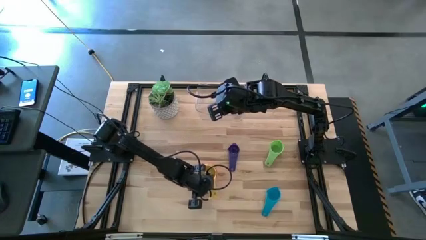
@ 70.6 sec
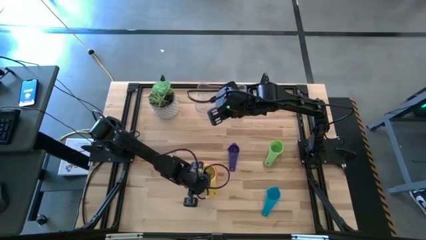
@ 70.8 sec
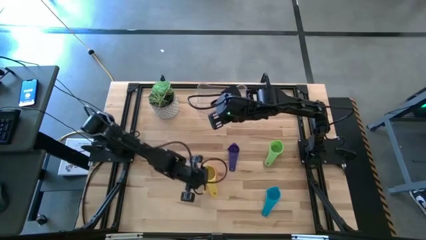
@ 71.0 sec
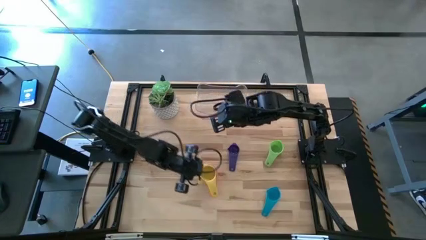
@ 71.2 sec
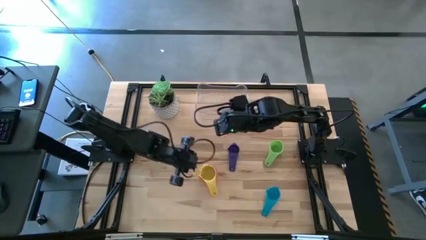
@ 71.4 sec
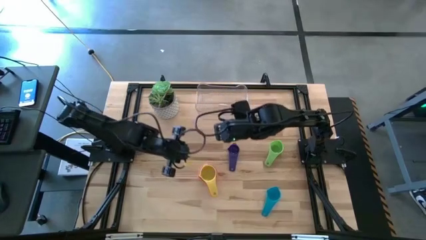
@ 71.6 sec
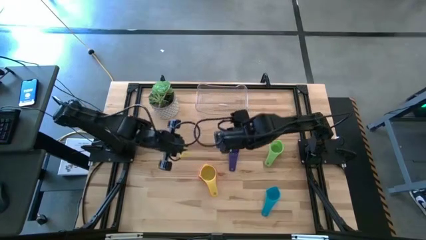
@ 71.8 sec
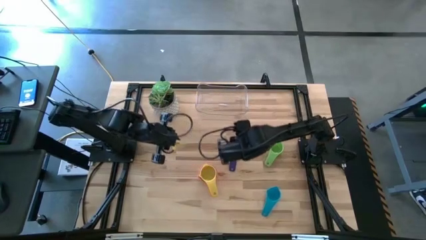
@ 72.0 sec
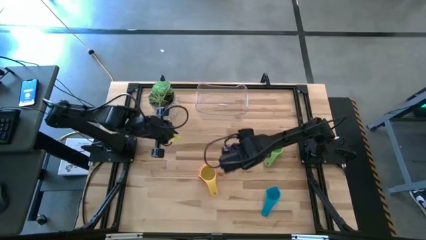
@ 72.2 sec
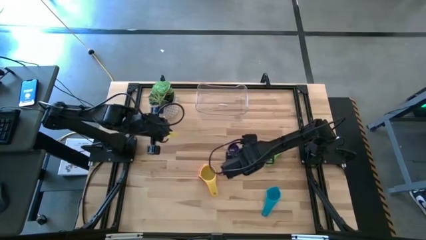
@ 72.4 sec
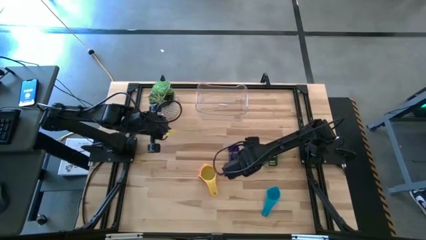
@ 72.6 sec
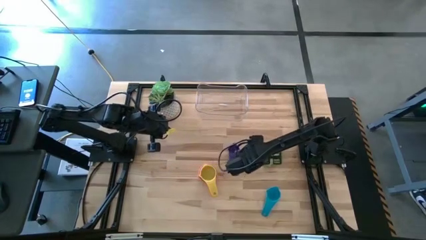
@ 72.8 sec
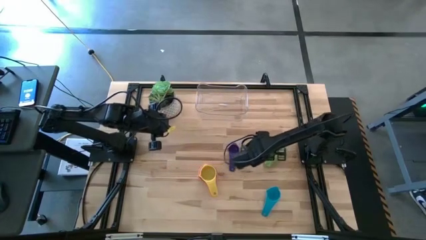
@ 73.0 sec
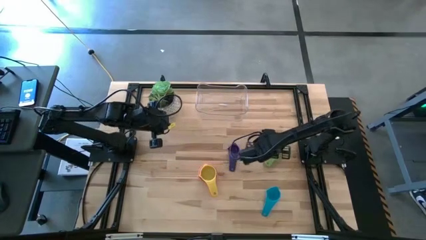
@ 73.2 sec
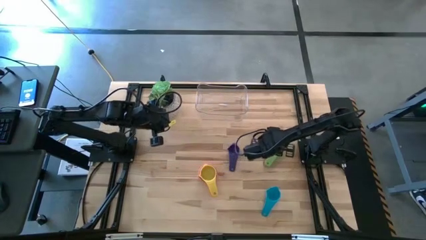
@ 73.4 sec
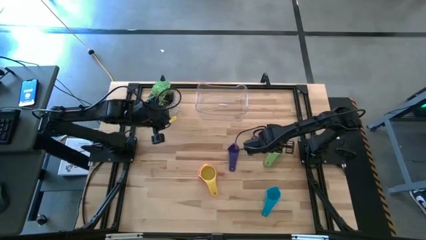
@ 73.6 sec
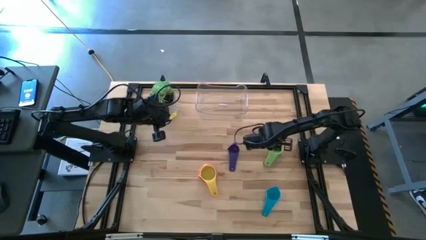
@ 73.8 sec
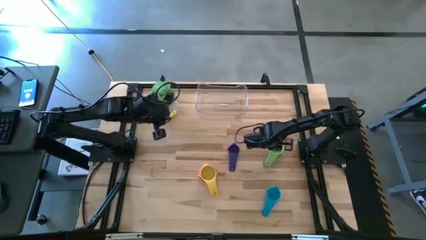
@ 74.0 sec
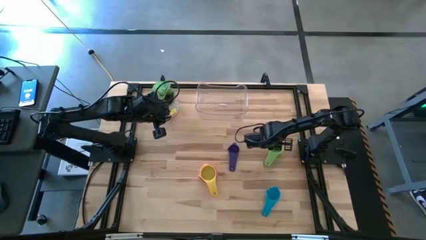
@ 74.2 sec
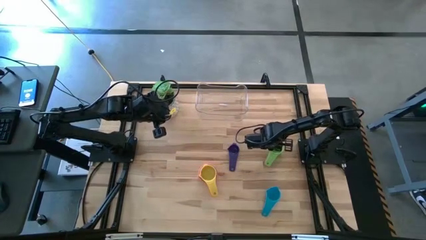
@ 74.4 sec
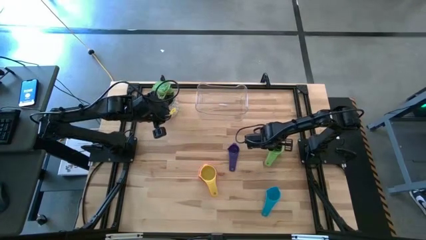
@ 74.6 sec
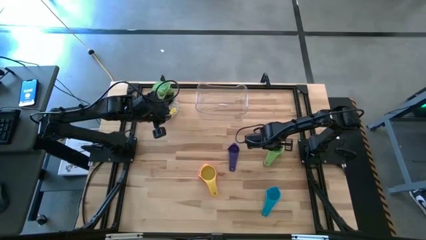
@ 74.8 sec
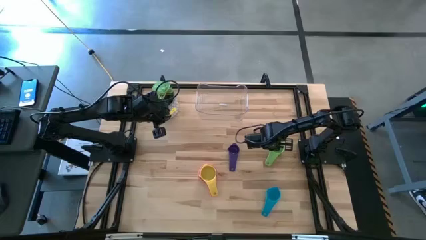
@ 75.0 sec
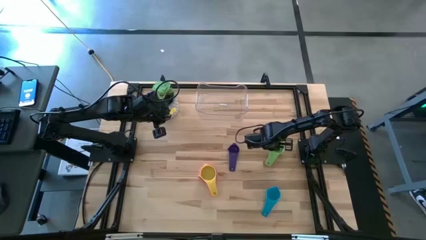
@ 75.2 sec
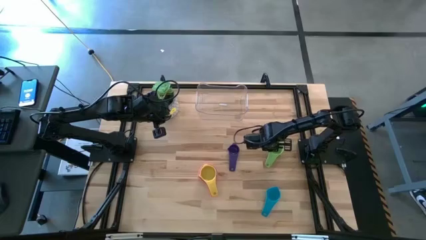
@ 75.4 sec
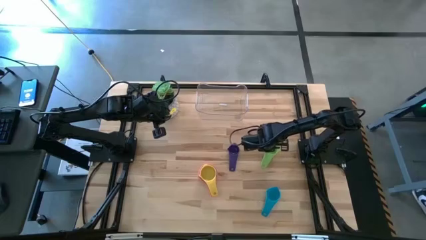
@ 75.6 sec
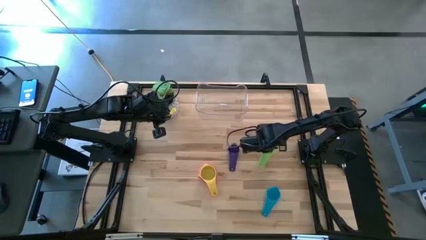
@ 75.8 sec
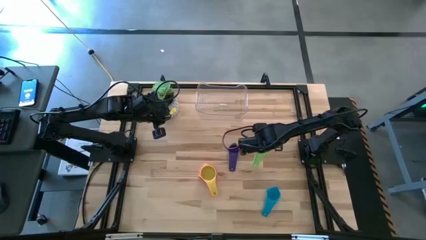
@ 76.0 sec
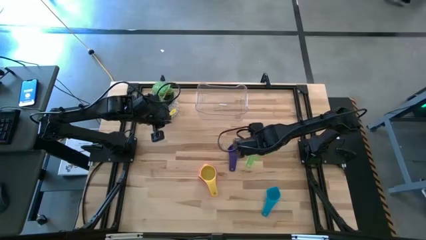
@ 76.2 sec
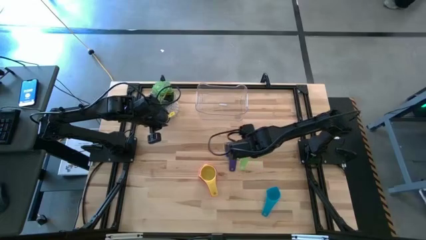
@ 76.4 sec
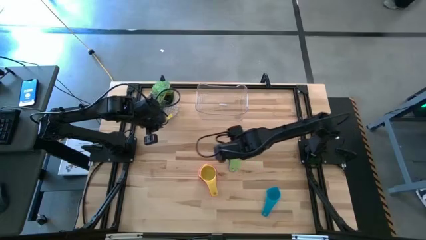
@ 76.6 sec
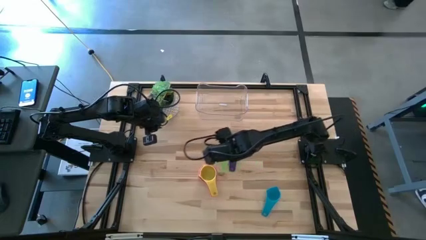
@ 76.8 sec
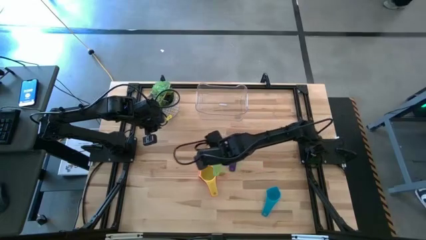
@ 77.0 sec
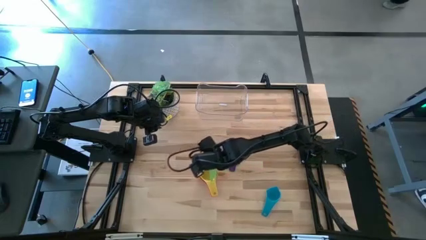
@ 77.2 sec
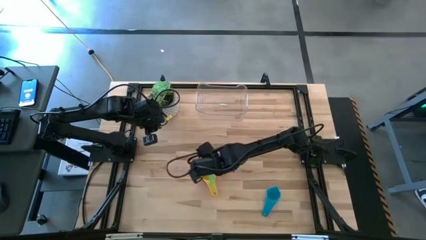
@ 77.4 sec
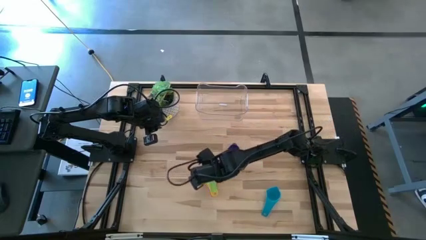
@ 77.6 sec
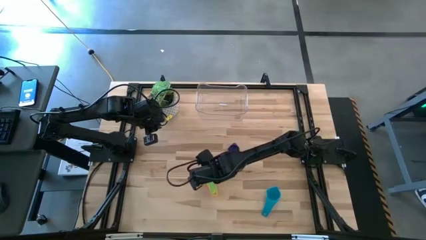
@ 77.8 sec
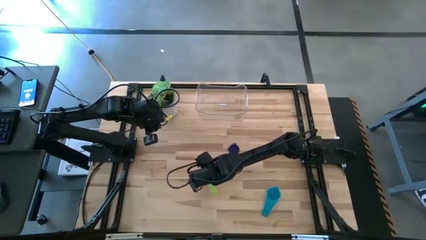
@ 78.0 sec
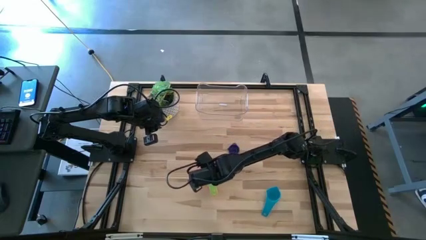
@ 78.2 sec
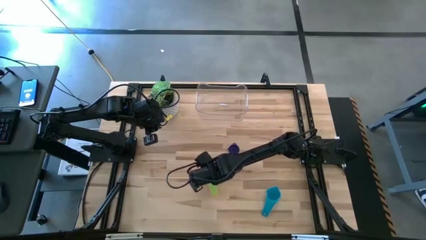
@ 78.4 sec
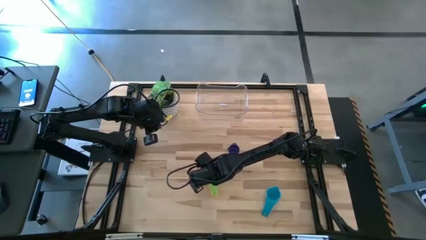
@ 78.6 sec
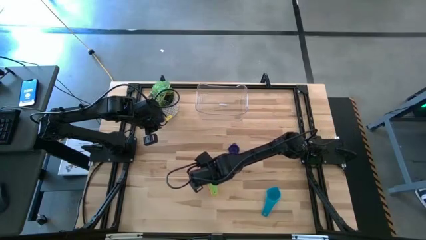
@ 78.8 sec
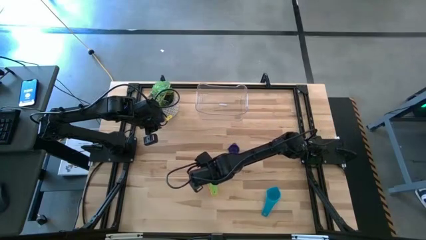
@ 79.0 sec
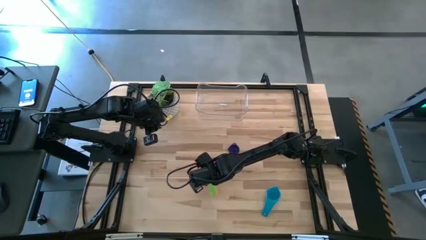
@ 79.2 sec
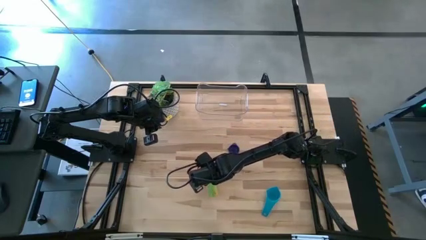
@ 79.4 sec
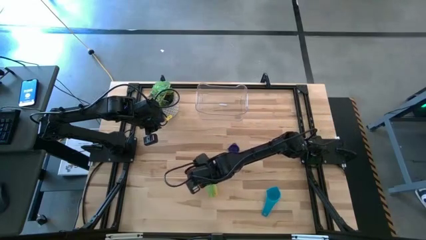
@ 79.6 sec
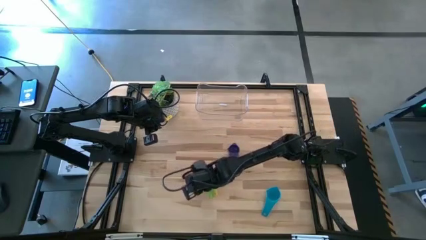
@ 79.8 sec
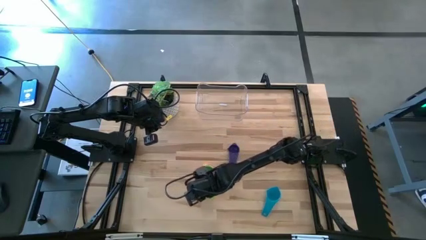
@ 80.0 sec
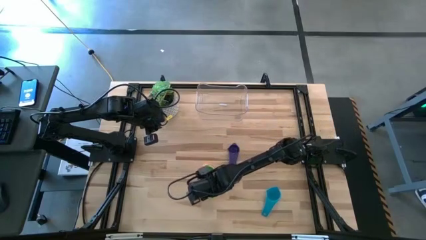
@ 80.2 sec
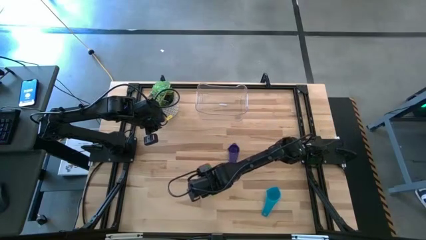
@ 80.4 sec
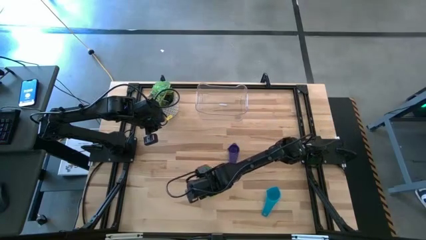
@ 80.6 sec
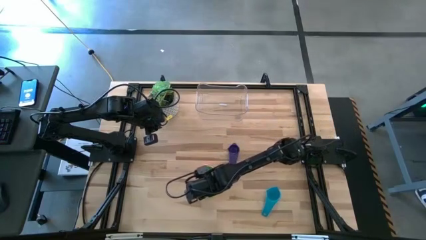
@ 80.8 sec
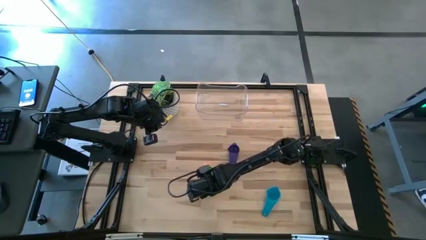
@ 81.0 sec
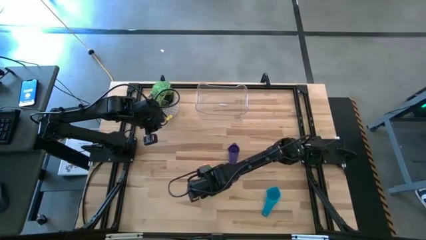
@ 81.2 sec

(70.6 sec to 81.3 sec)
Task: Nest measuring cups in basket
Stack the green measuring cup into the yellow measuring cup

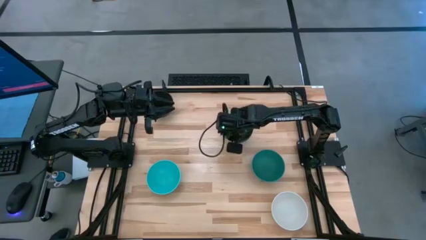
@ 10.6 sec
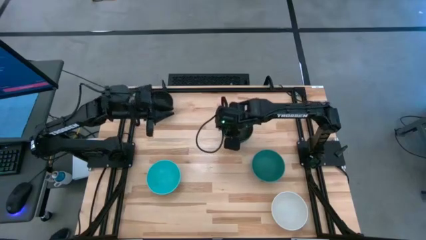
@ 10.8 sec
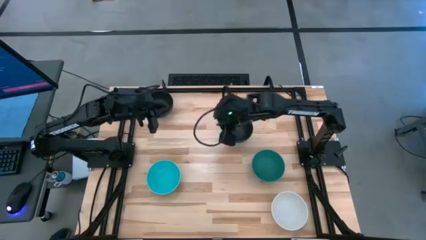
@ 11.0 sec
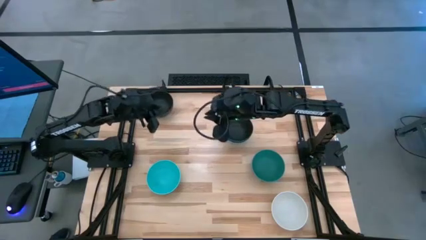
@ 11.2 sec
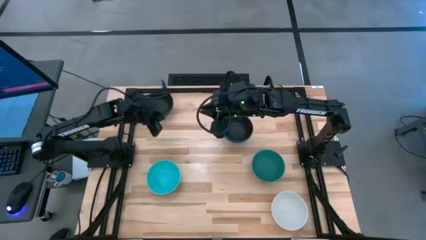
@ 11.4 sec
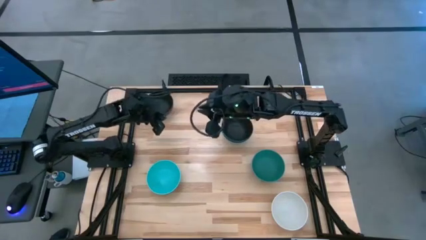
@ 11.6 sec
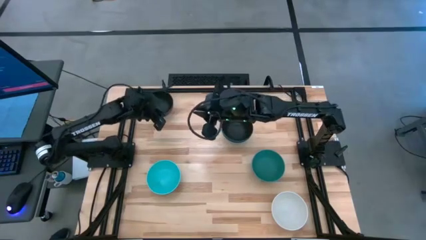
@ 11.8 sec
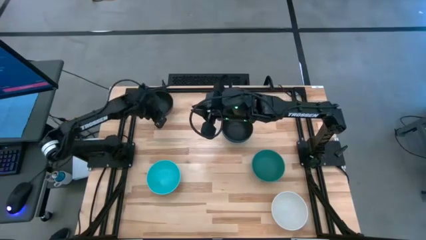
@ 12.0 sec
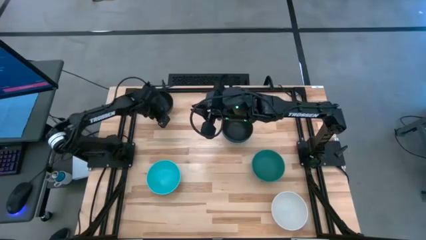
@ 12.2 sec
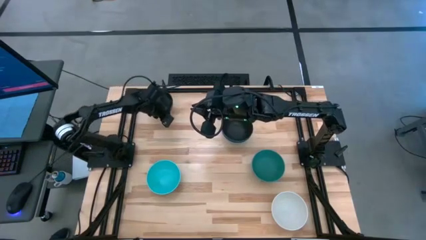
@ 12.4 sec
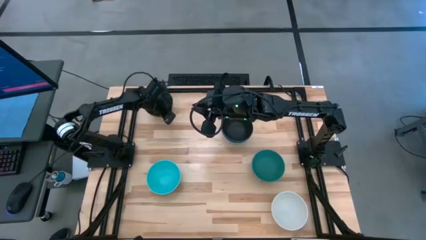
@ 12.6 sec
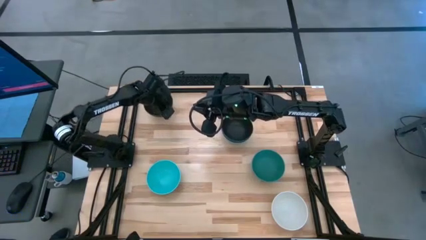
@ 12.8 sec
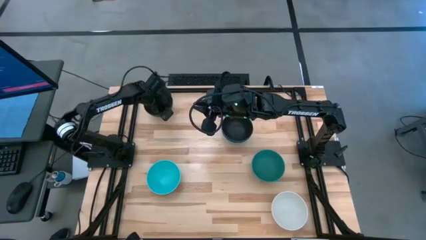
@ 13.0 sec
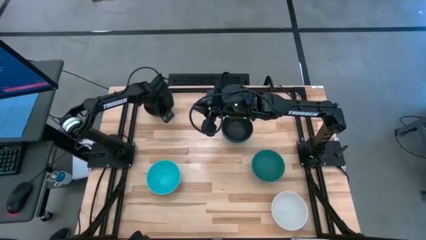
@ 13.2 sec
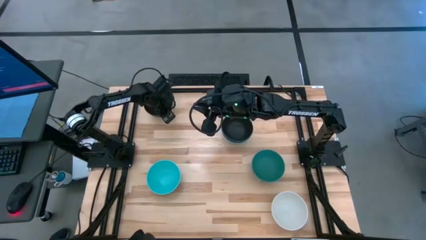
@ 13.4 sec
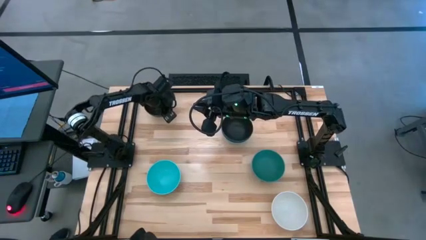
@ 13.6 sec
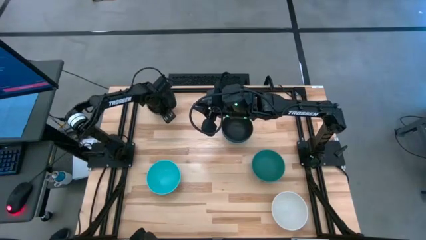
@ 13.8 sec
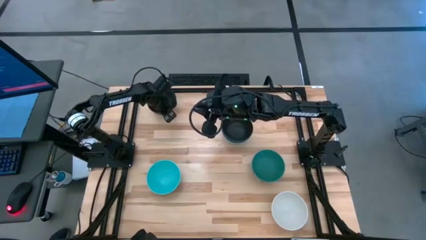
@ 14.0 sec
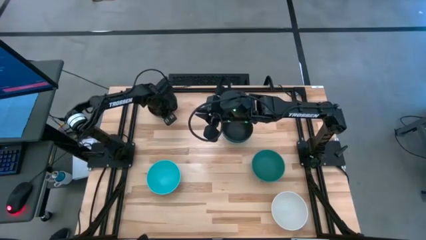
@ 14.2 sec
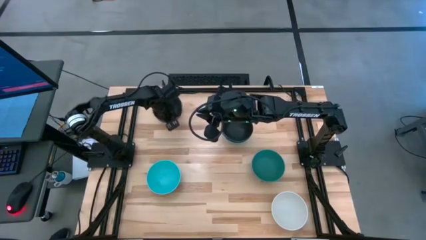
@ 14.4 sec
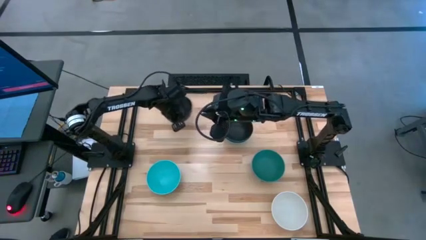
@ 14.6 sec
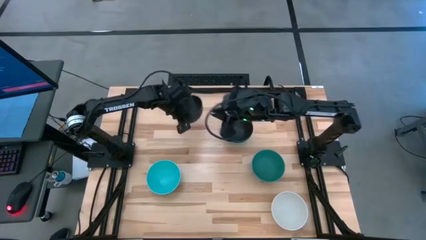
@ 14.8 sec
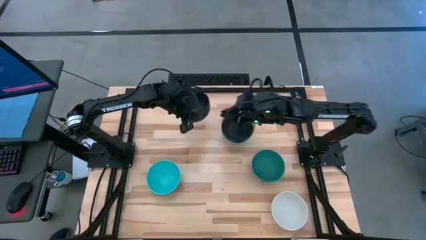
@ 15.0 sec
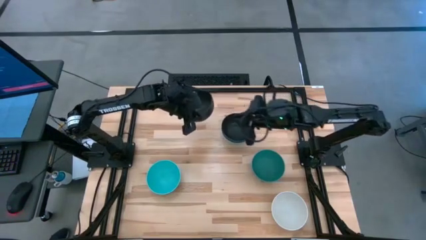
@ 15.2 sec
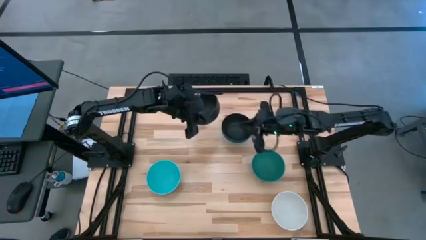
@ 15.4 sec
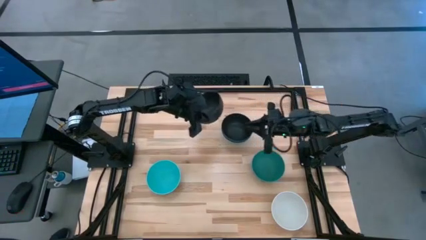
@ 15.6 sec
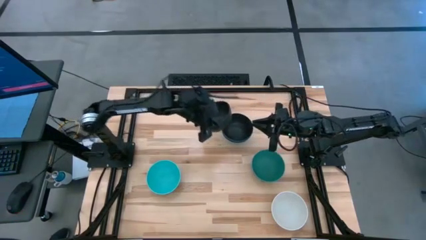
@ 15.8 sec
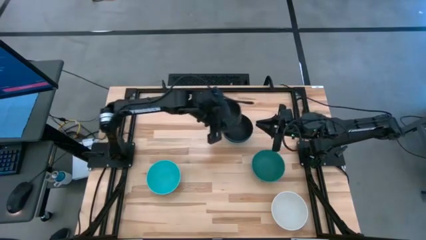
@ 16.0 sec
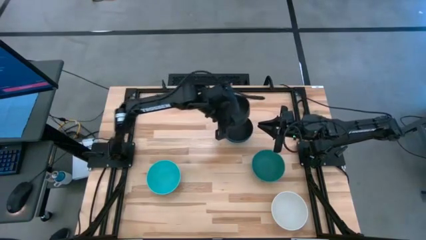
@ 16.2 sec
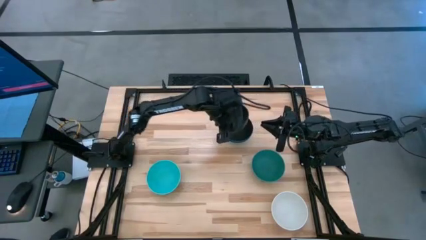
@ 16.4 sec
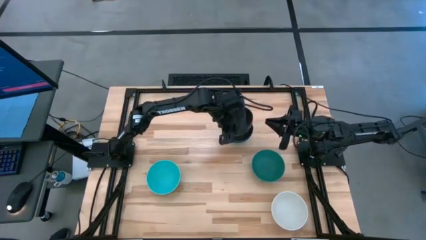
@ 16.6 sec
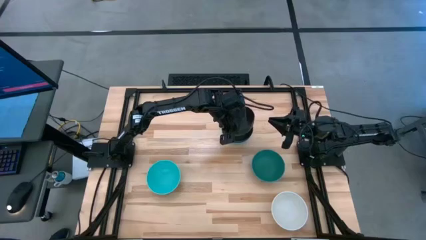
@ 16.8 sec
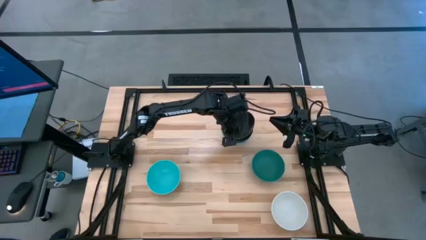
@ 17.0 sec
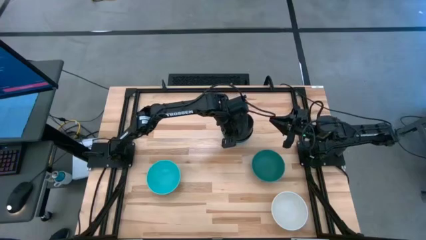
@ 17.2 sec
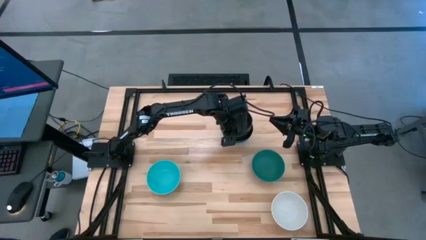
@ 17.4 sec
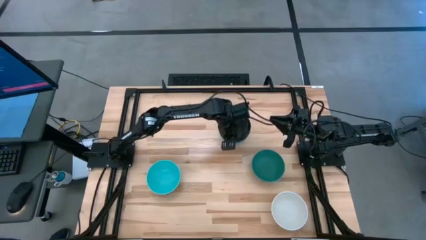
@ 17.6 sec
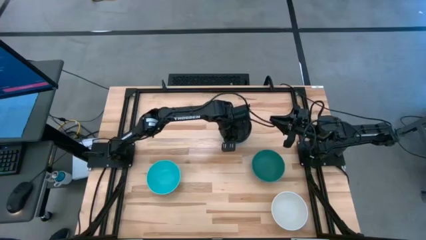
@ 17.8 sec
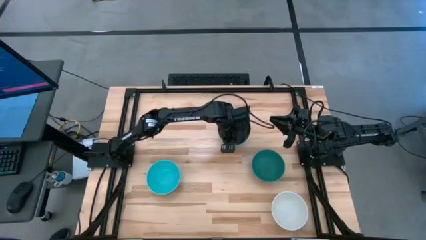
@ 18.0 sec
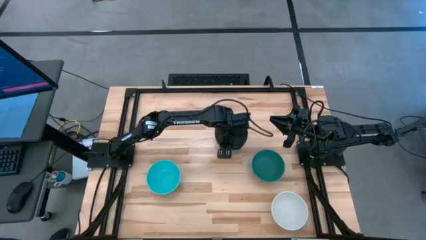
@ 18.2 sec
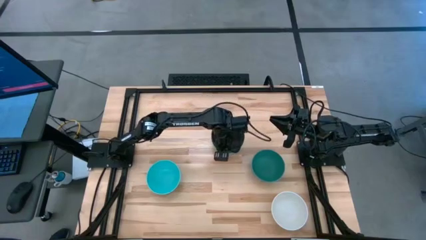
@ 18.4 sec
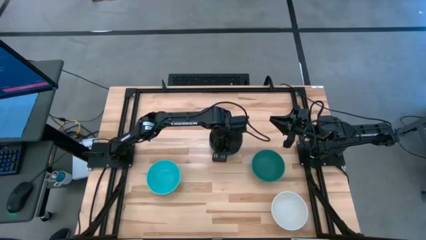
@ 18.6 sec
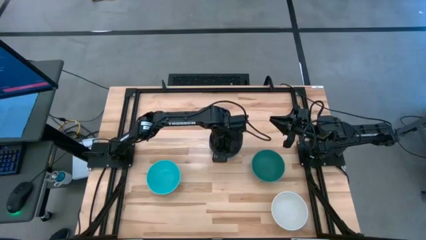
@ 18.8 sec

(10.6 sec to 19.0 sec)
Task: Nest bowls inside each other
Stack the left black bowl on the black bowl
